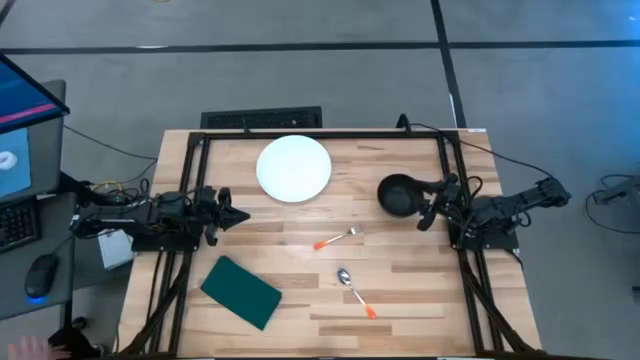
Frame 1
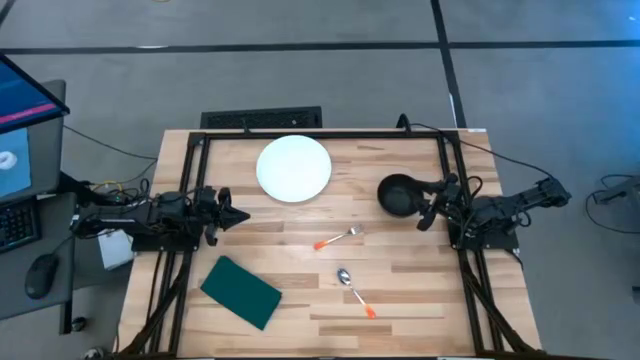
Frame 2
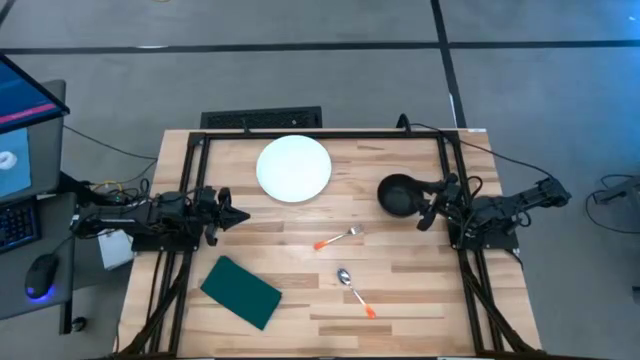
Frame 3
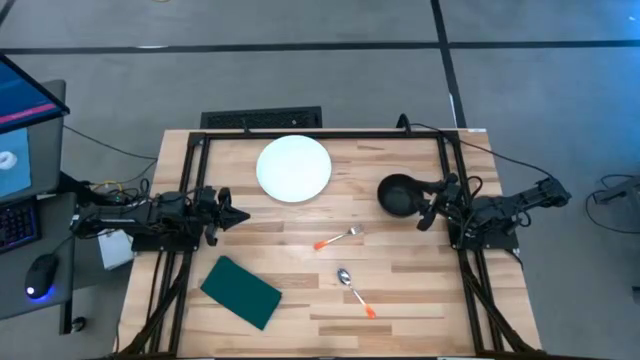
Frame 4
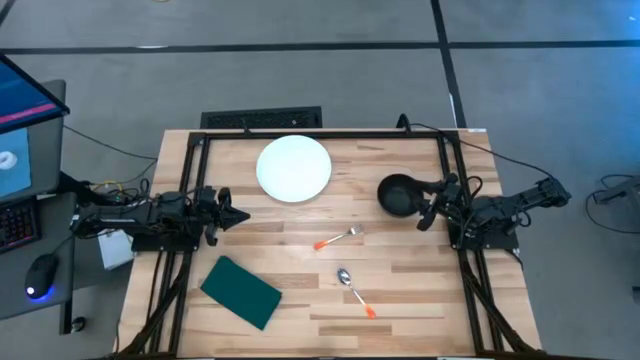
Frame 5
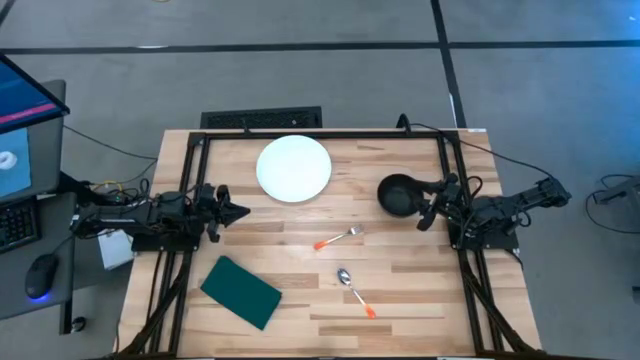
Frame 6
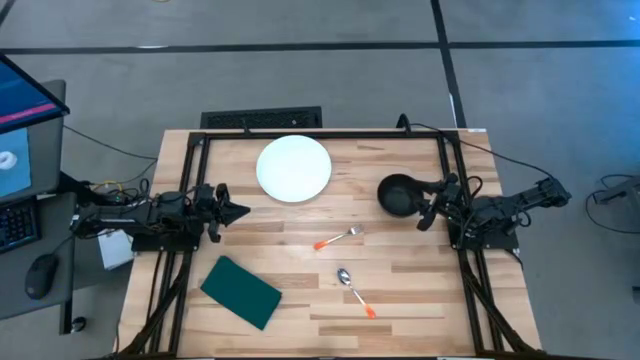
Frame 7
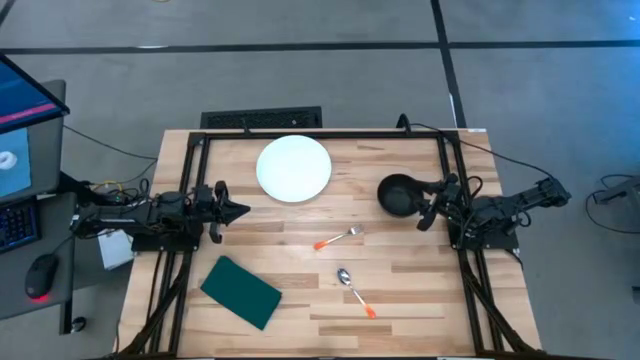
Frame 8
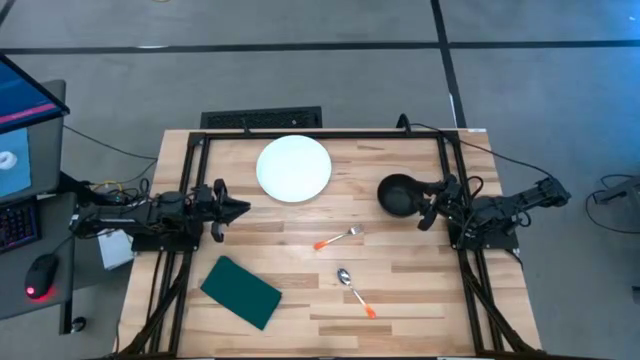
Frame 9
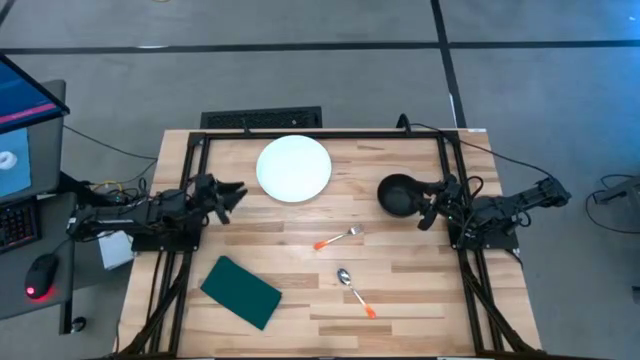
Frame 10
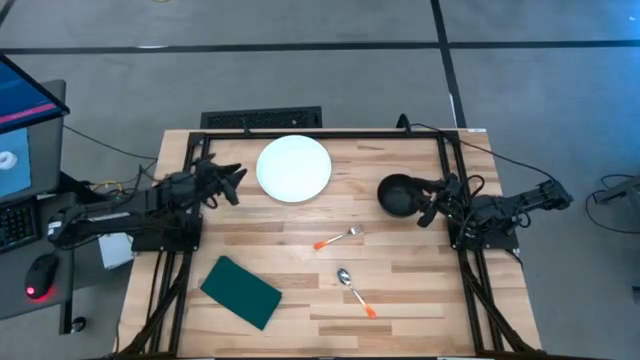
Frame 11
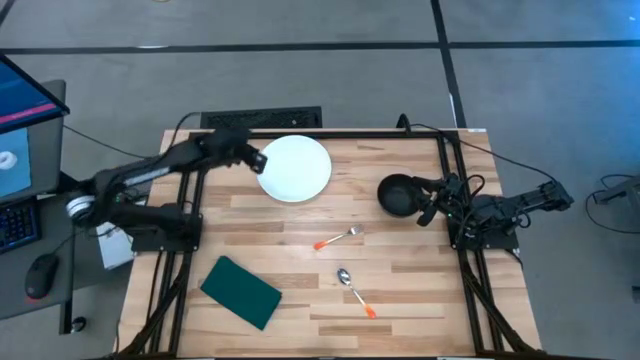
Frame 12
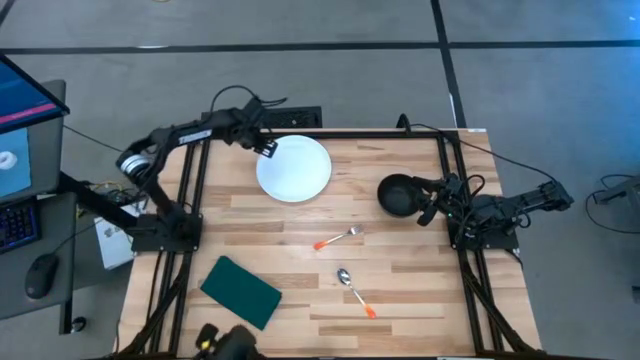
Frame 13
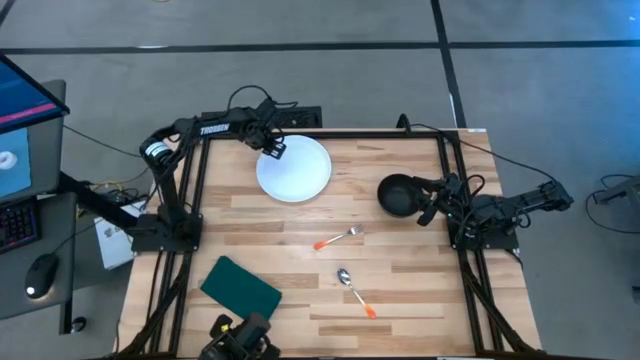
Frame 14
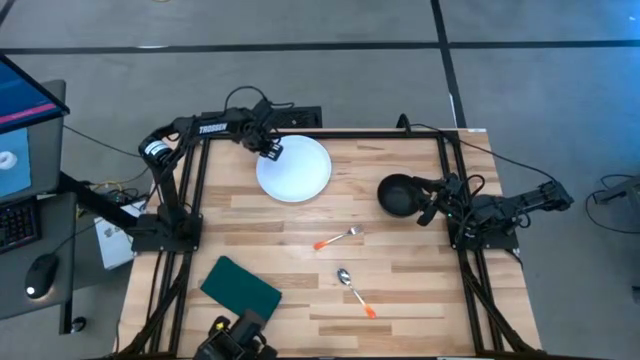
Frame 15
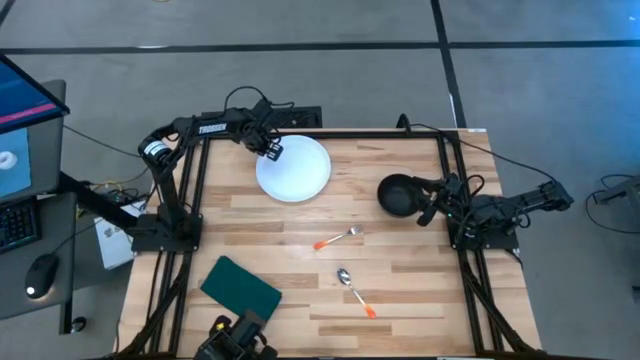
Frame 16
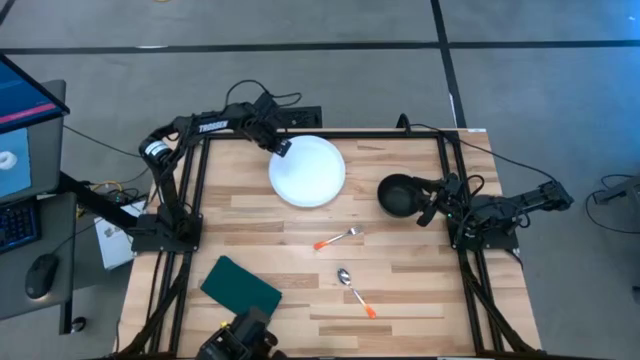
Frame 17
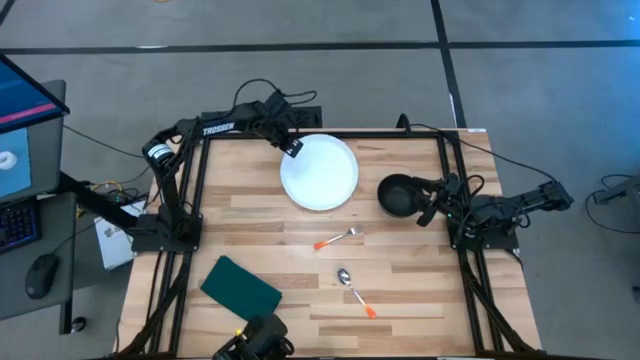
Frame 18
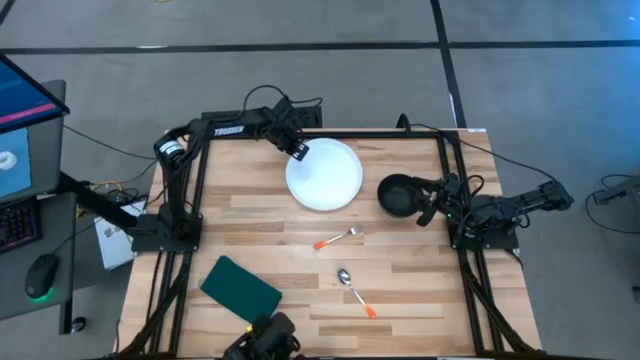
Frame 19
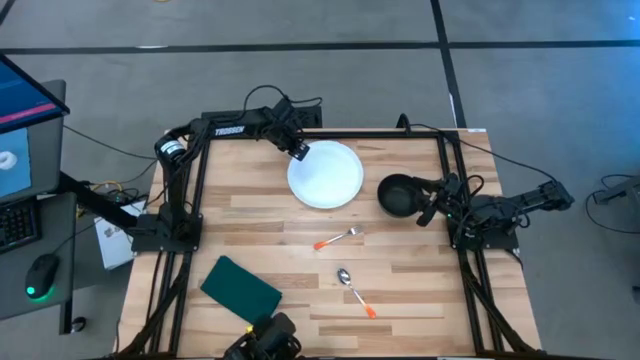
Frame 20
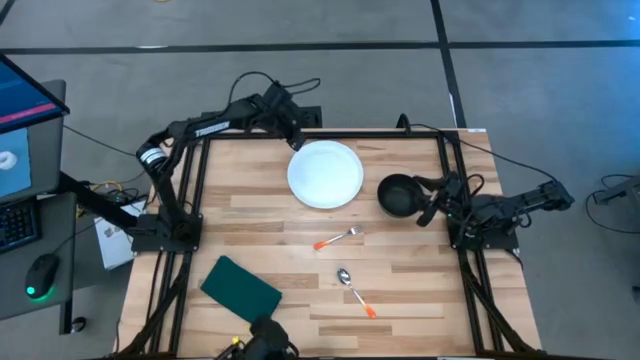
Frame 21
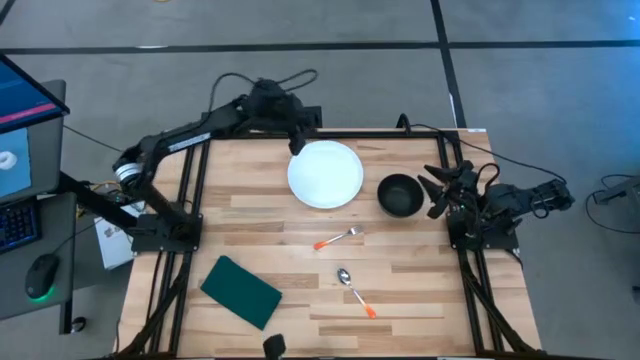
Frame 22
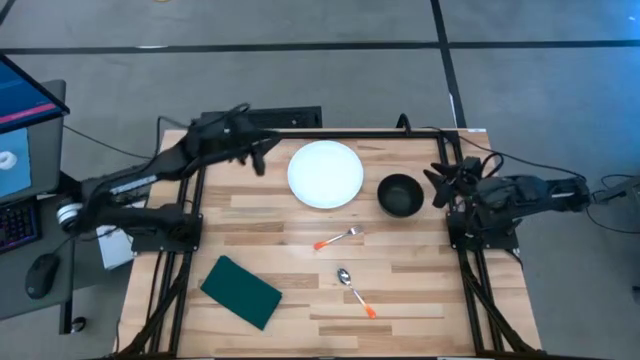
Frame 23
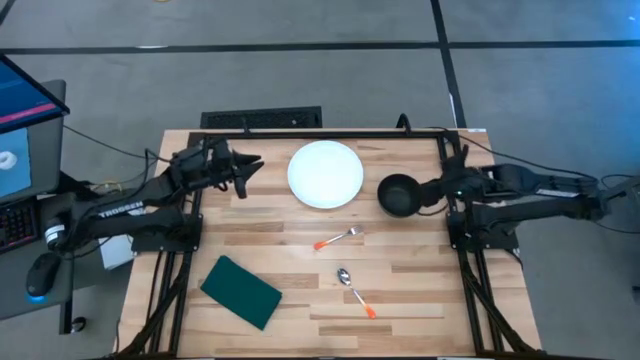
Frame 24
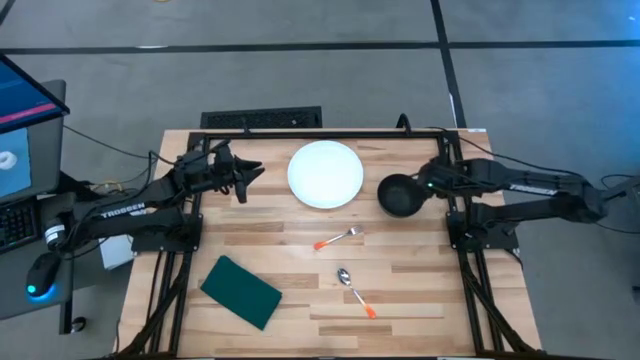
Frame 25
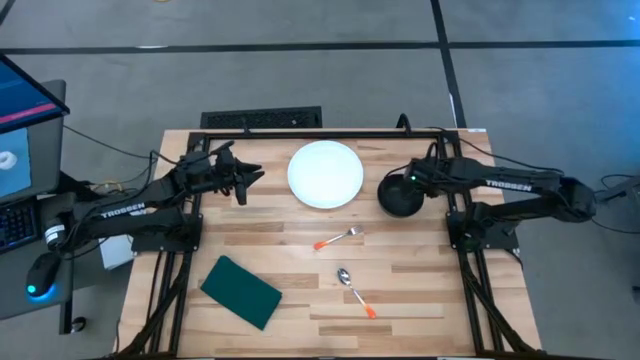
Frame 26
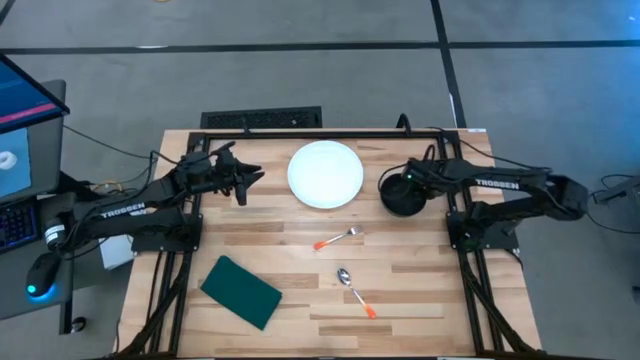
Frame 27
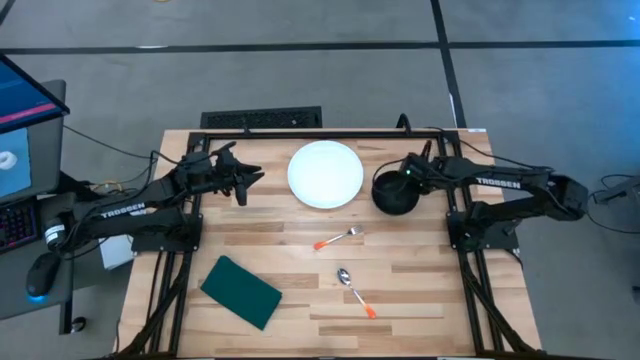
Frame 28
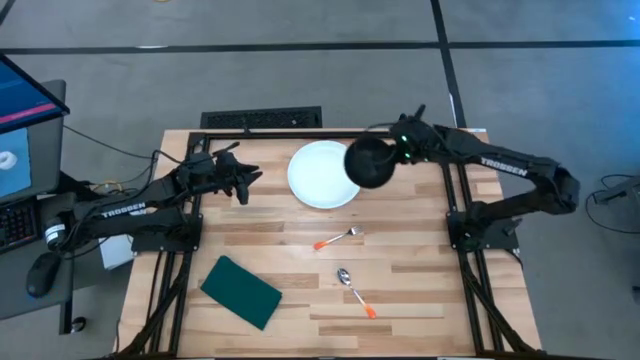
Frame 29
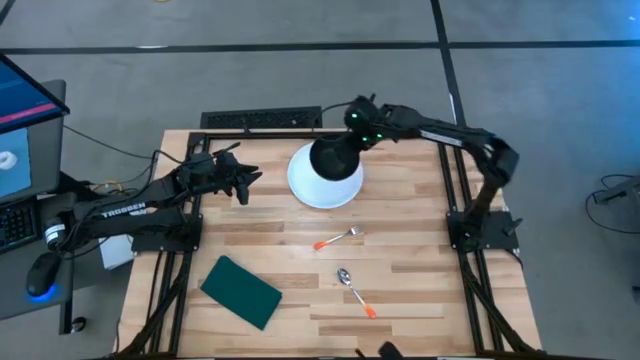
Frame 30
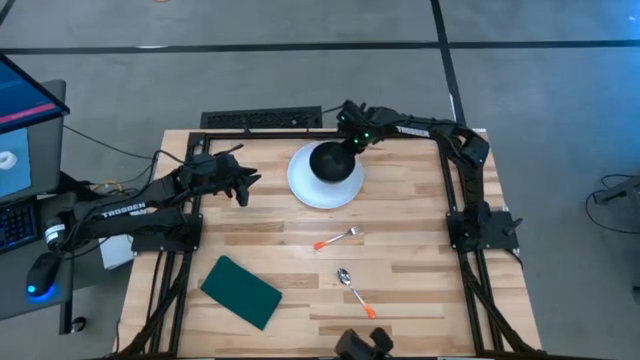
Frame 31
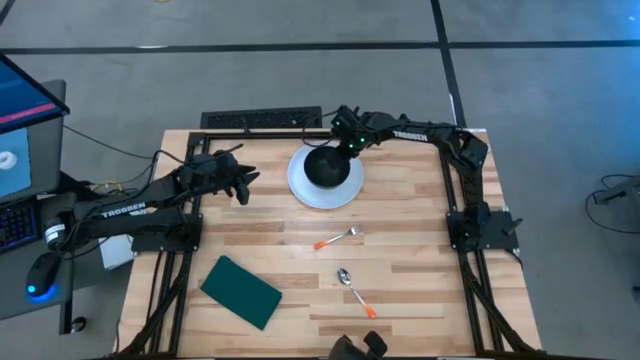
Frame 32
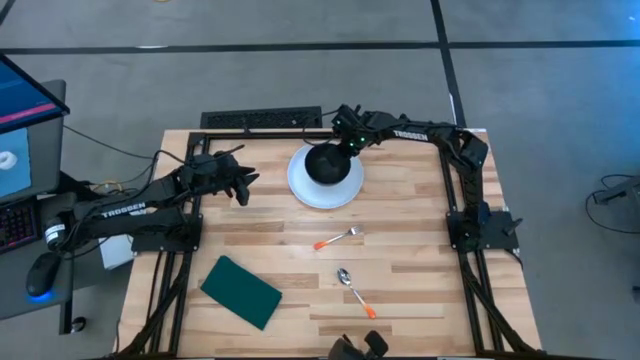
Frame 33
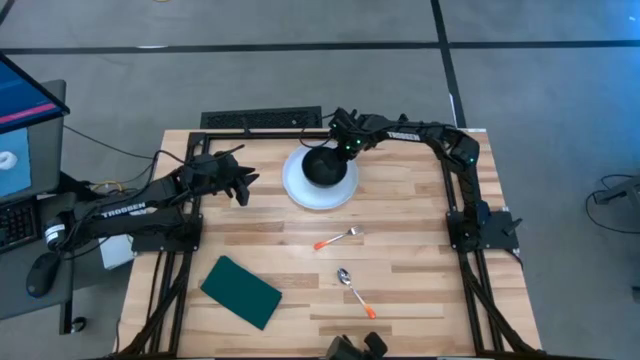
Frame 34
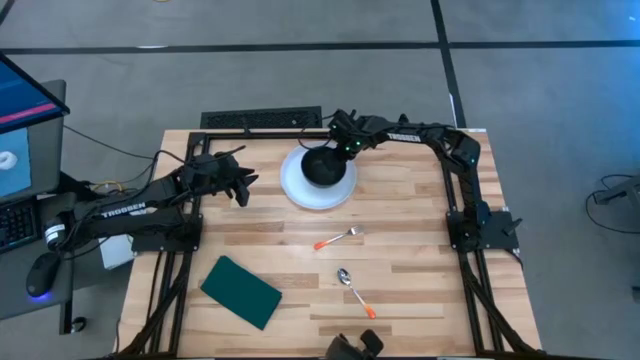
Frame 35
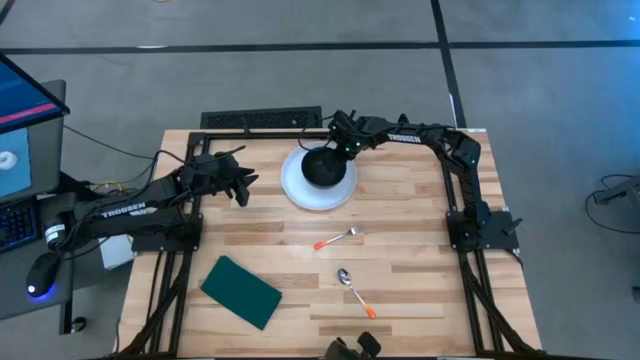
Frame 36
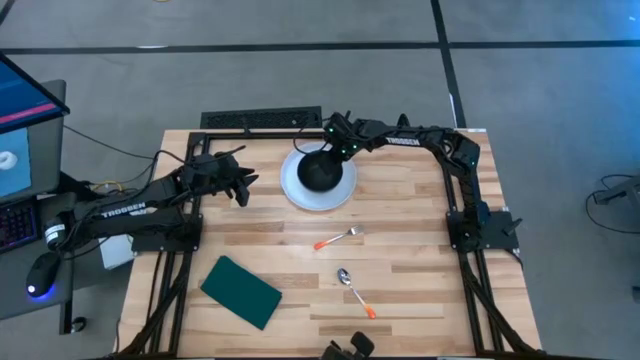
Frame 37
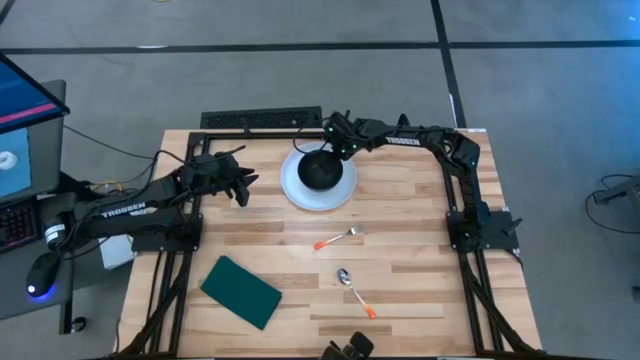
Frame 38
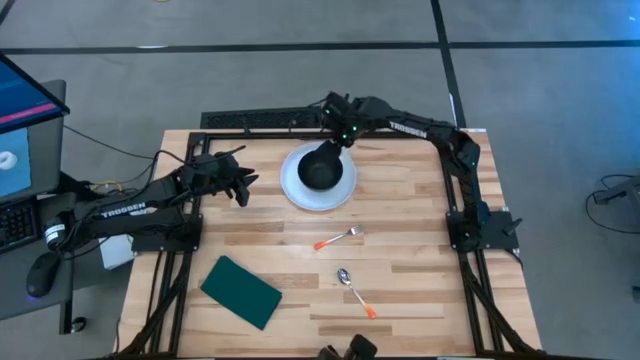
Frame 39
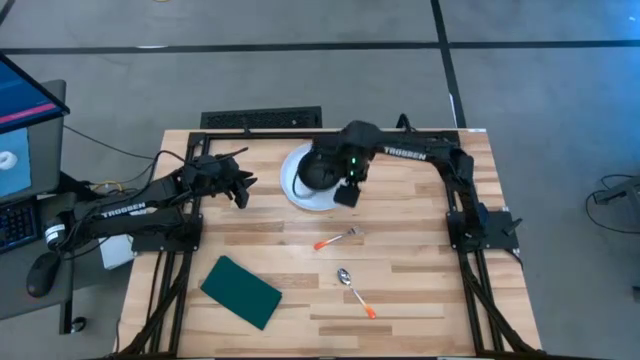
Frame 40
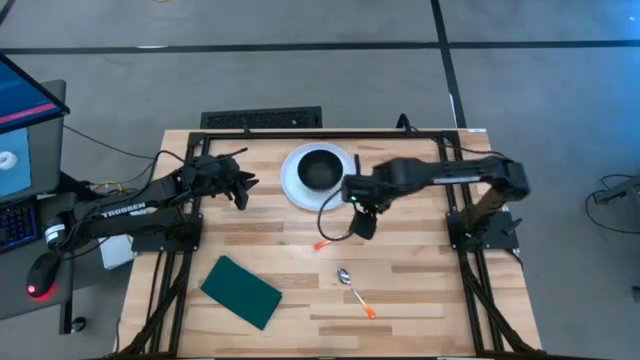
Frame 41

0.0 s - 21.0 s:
Task: Set table place
Place the black bowl on the white plate
